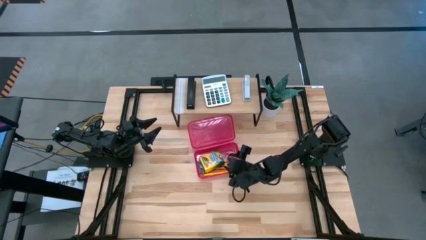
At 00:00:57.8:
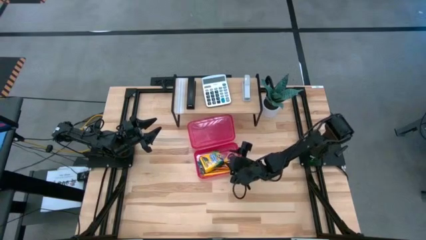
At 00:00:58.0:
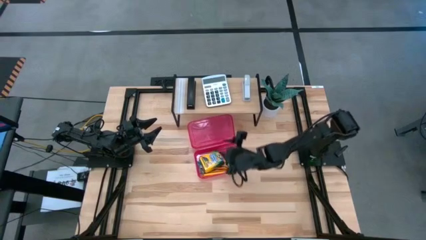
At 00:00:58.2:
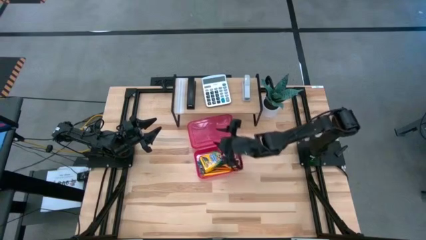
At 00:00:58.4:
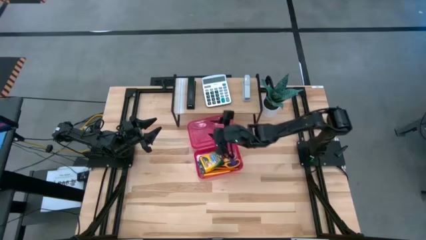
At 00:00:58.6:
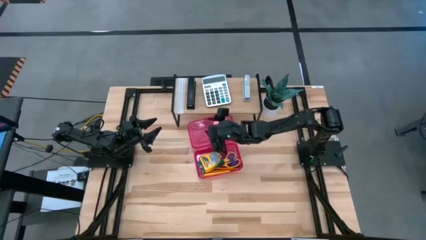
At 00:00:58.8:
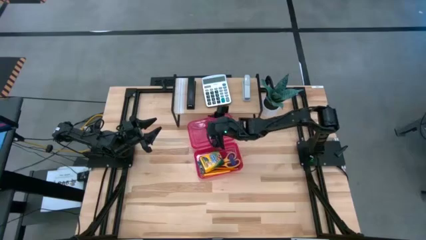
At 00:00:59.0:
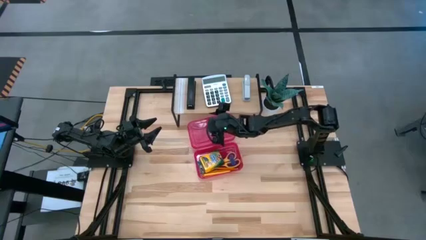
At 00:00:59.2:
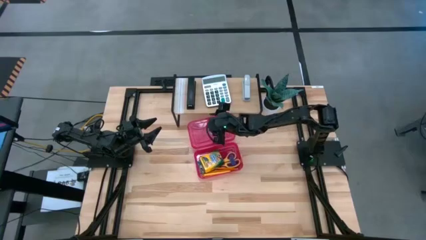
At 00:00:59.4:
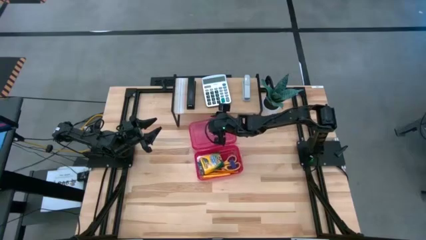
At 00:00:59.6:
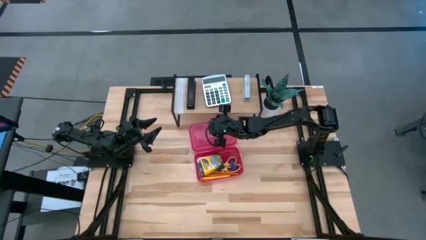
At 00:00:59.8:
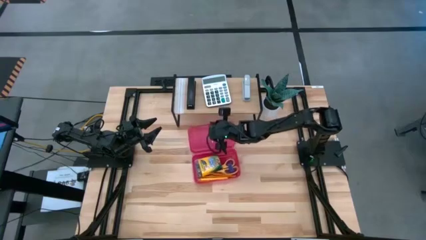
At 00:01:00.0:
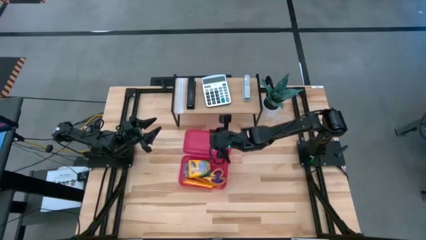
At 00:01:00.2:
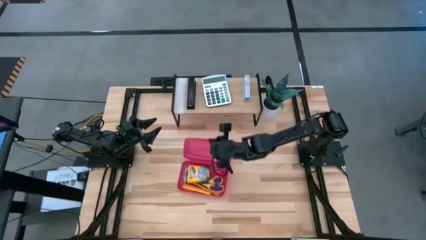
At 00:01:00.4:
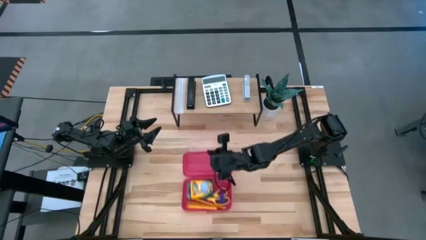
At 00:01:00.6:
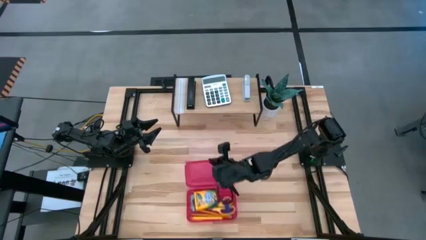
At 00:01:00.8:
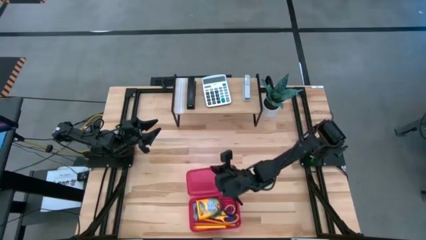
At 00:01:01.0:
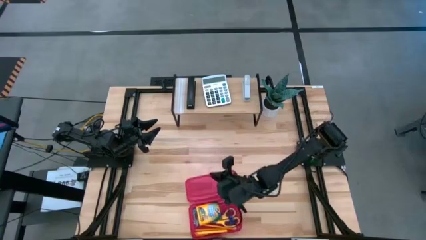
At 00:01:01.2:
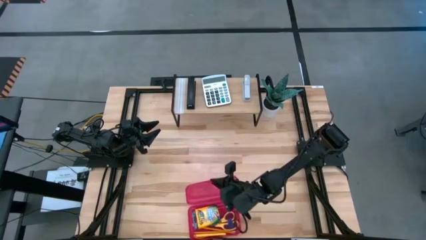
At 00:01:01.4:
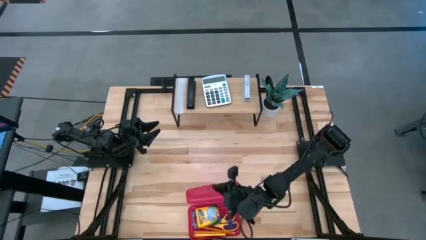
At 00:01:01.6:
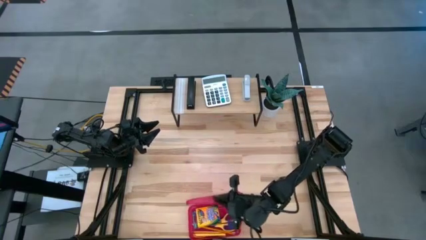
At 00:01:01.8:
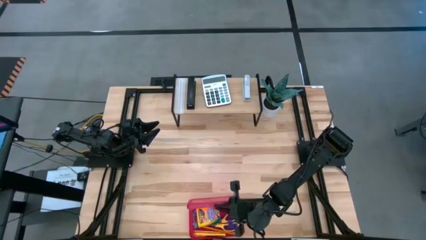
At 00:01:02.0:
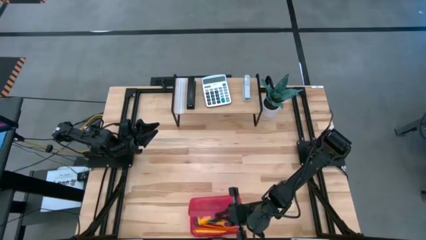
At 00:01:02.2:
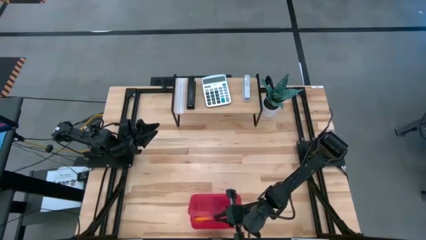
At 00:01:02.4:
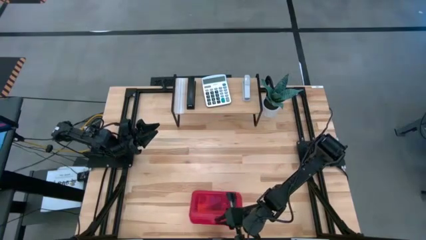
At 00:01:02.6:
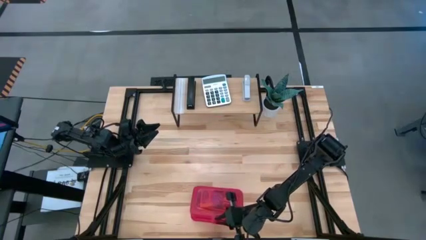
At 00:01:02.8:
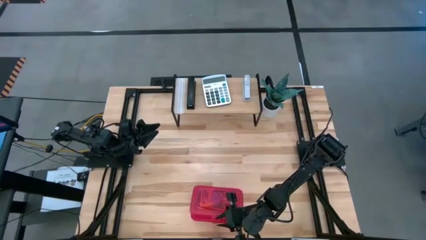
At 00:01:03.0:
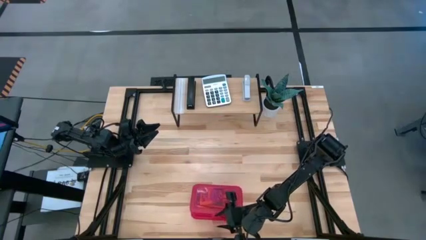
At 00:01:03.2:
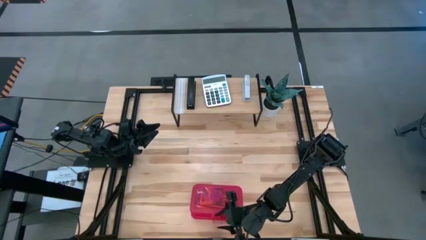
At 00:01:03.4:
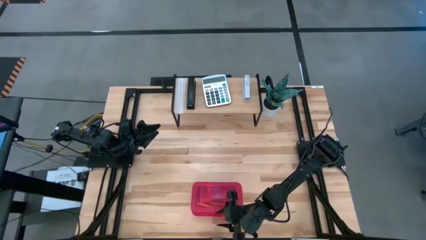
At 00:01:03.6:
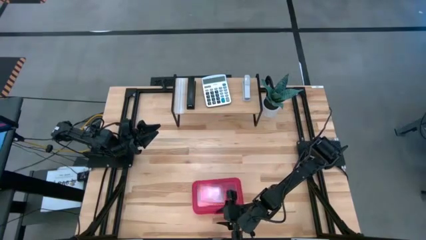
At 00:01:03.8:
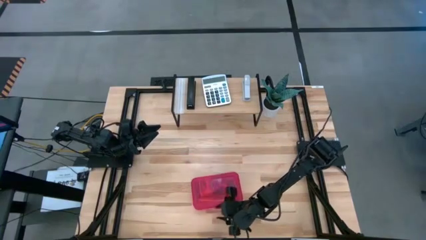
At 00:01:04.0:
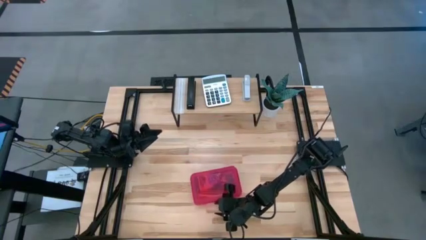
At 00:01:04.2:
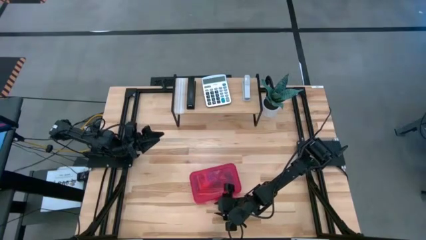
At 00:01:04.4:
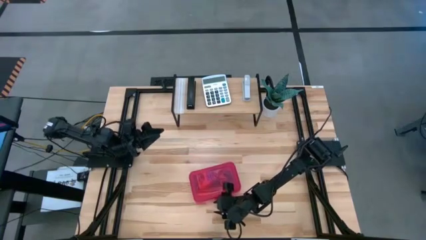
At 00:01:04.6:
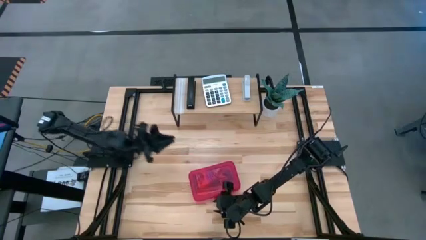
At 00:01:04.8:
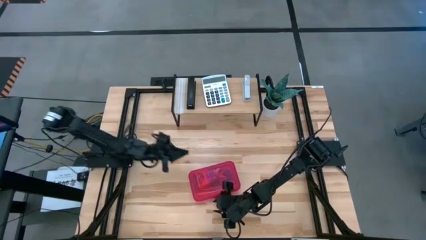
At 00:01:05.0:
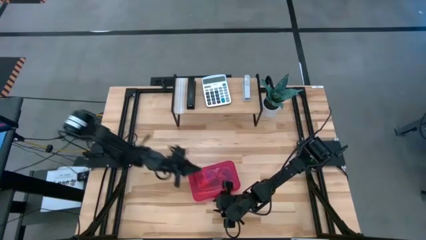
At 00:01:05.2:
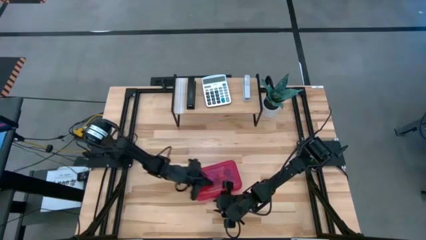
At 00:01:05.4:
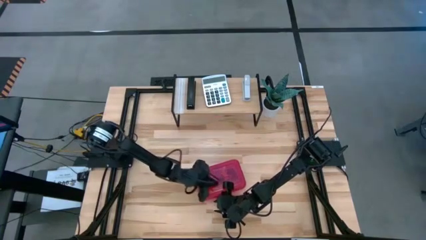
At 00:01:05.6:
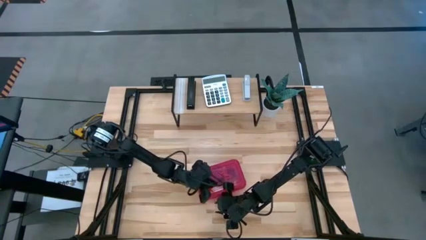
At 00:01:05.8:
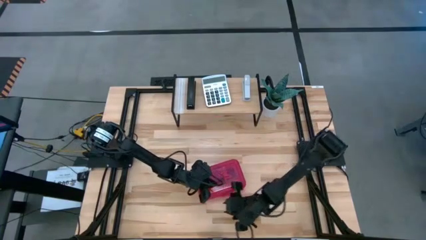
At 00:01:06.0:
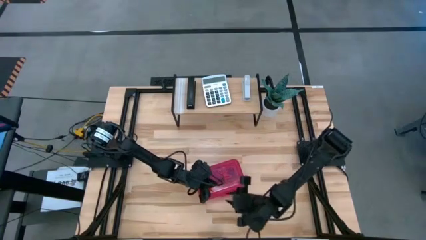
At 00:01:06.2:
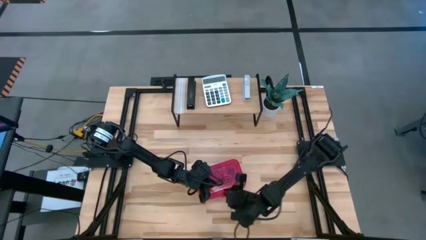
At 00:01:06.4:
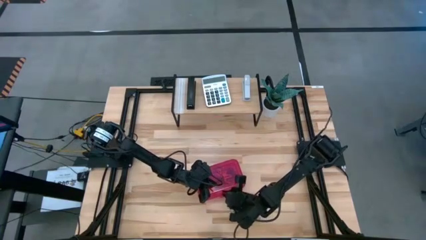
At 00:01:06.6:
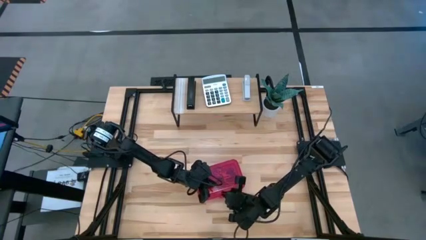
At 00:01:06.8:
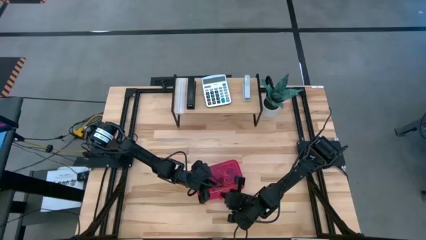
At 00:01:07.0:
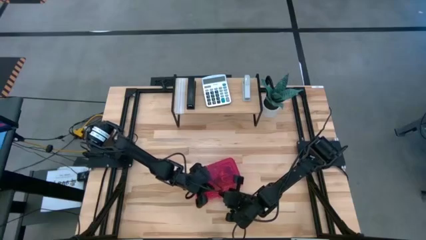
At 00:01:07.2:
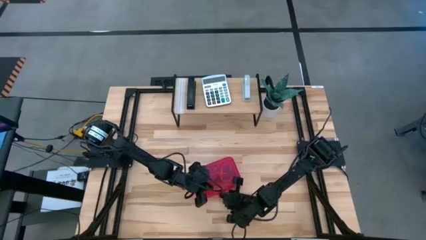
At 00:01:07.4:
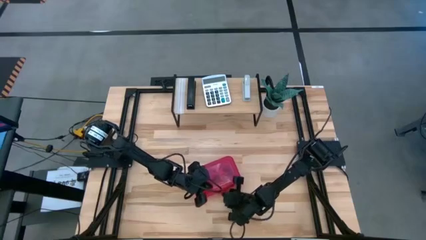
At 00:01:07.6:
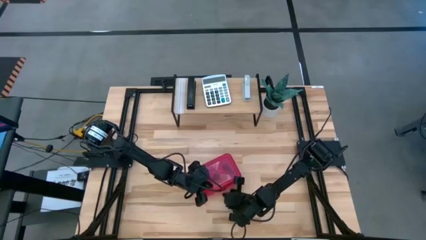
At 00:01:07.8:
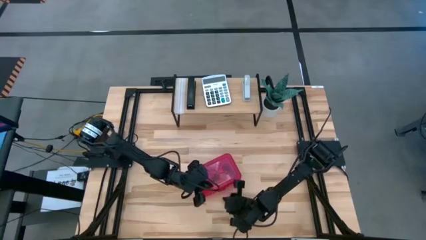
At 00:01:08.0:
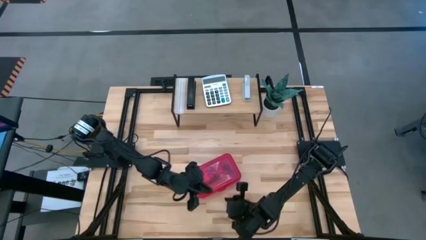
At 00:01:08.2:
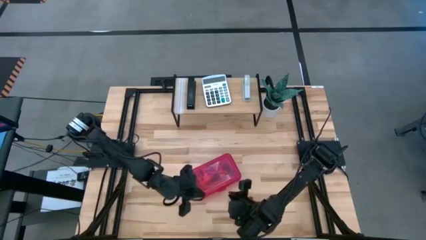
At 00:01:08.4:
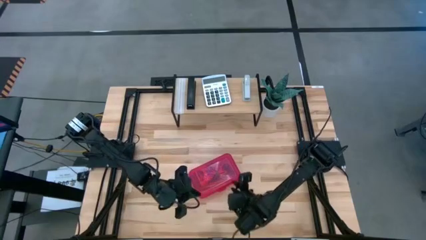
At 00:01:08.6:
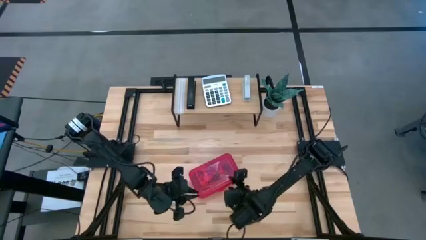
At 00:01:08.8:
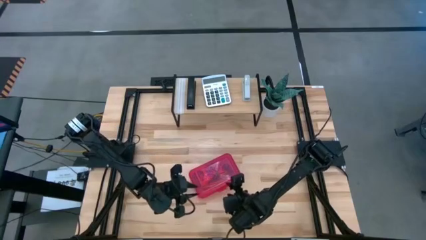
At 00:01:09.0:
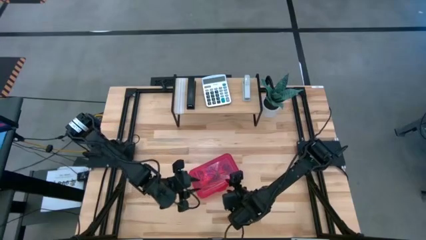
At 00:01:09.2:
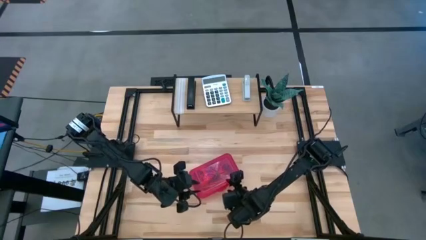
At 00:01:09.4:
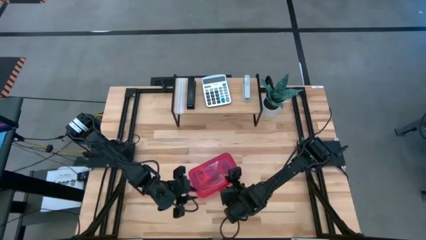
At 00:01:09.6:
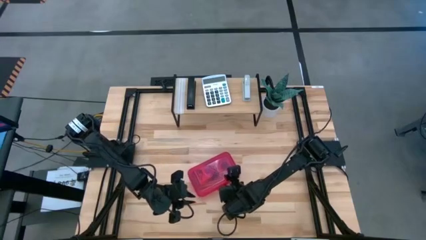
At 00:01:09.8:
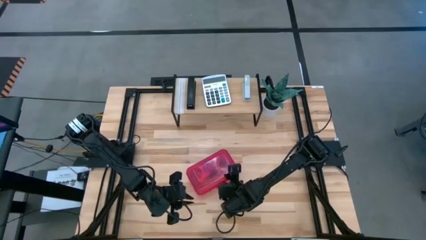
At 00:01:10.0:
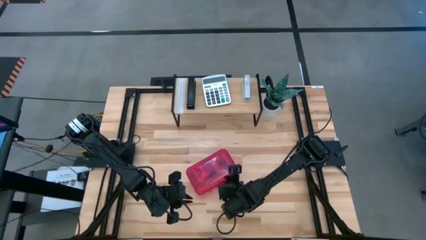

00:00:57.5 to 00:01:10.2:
Task: Pack school essentials
Close the red supply box

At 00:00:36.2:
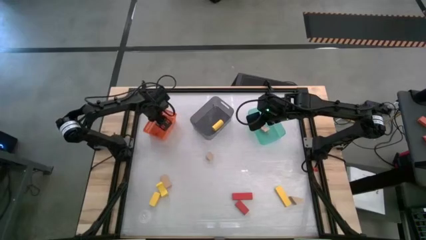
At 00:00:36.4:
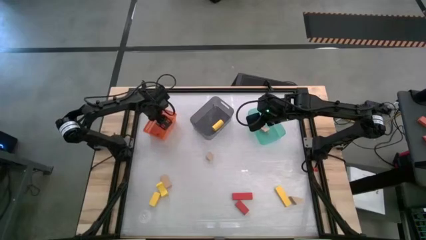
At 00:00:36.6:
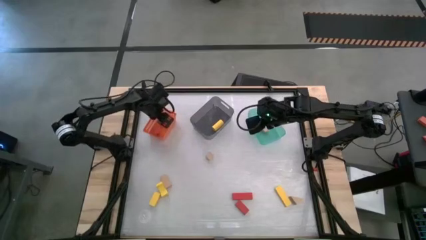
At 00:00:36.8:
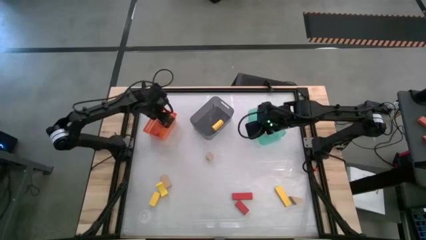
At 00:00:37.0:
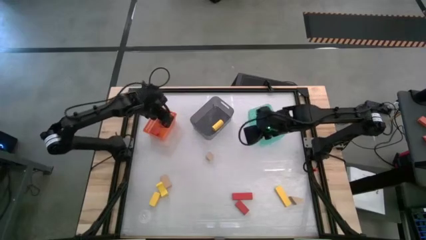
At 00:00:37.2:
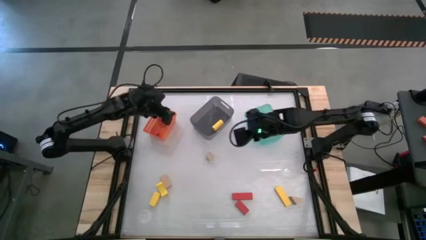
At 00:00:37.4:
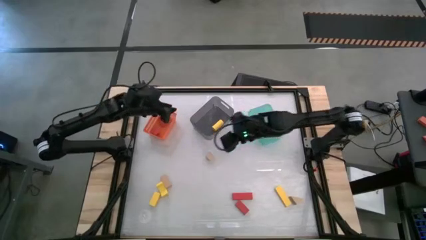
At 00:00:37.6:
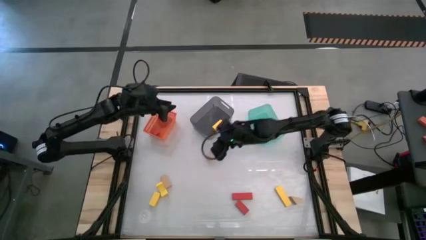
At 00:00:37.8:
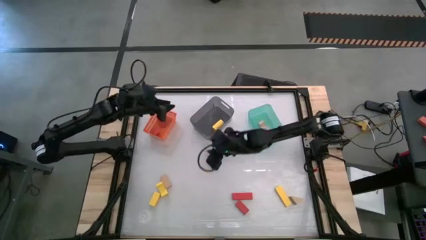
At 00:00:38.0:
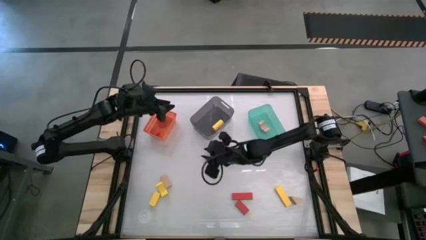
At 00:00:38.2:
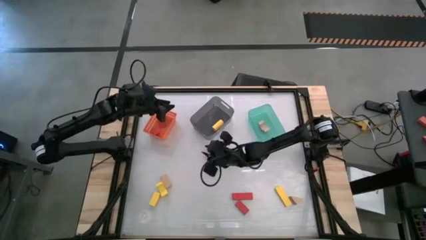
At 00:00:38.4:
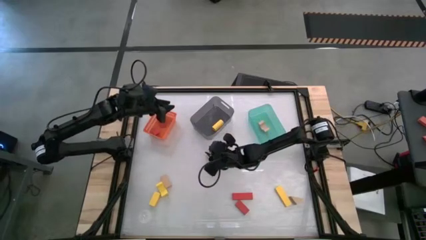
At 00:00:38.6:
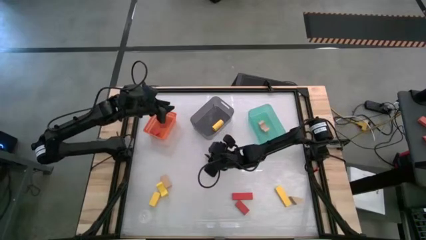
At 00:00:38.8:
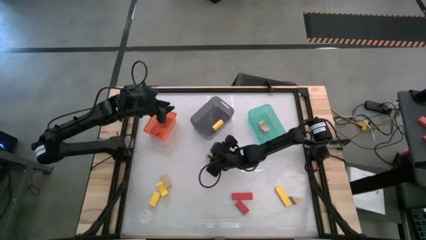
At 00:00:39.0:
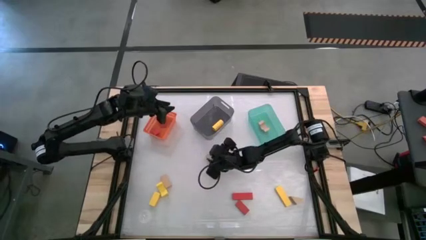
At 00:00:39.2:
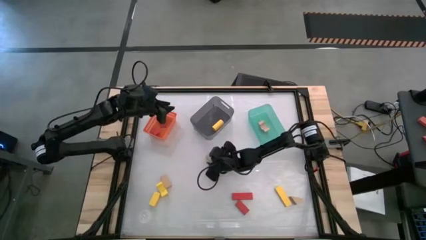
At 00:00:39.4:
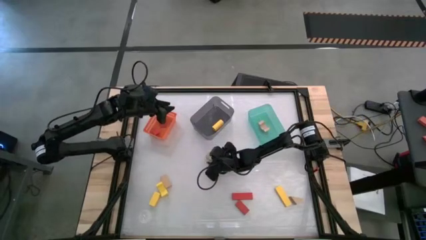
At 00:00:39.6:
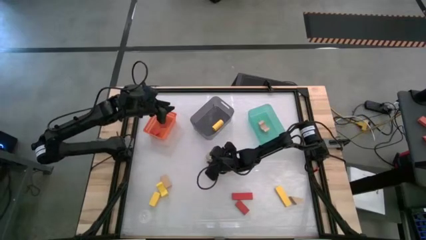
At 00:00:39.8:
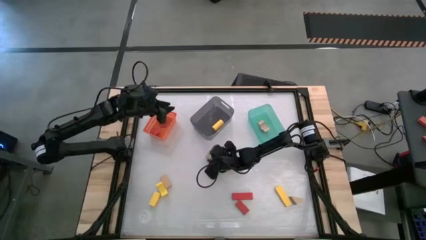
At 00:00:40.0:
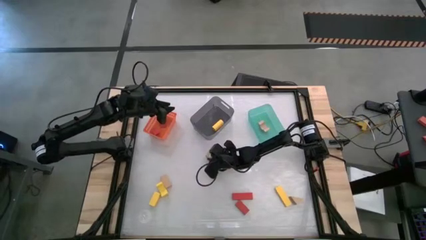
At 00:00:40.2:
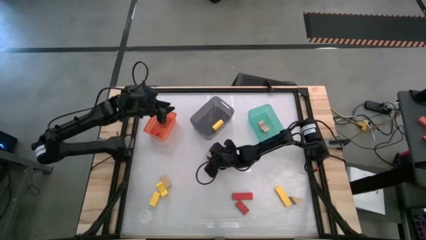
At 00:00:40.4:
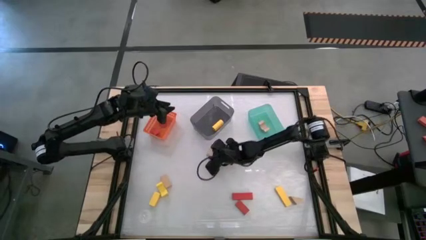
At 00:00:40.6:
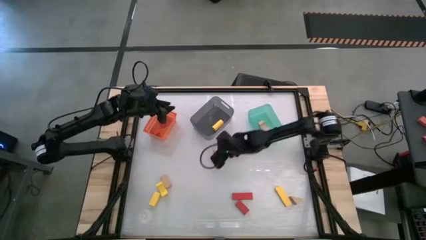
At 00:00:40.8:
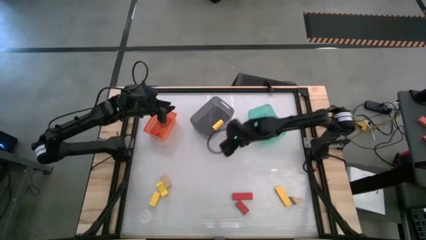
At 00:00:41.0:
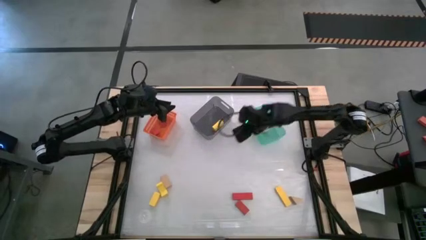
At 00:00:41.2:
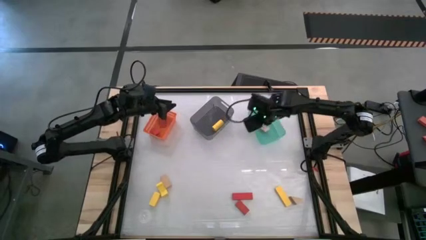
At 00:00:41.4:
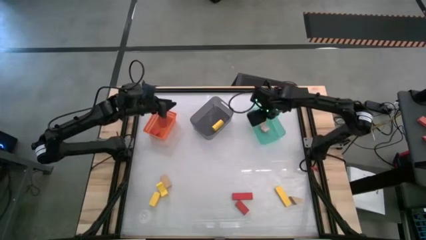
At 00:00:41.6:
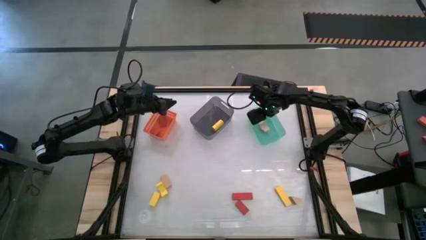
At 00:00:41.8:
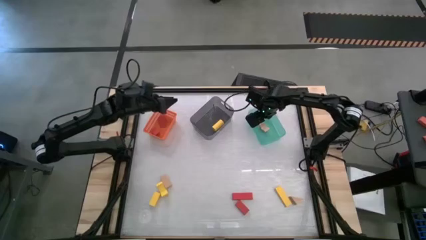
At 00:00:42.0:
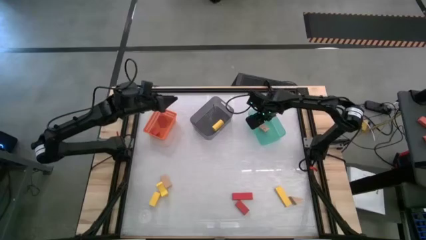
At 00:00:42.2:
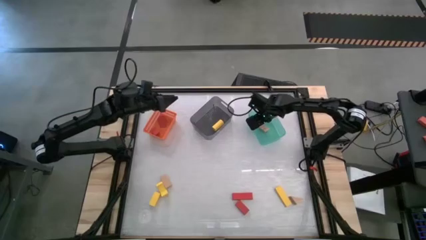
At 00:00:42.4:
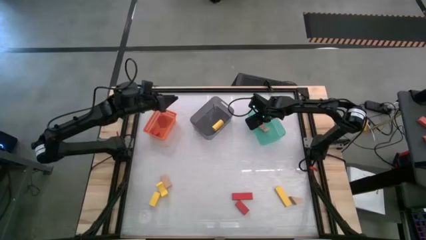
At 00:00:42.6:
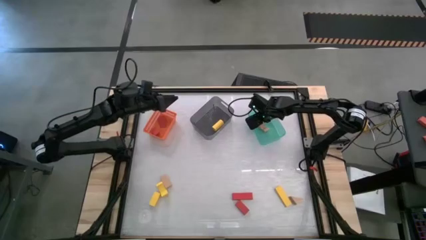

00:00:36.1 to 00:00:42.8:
Task: Sort & place blocks by color
Put the brown block into the blue bin
